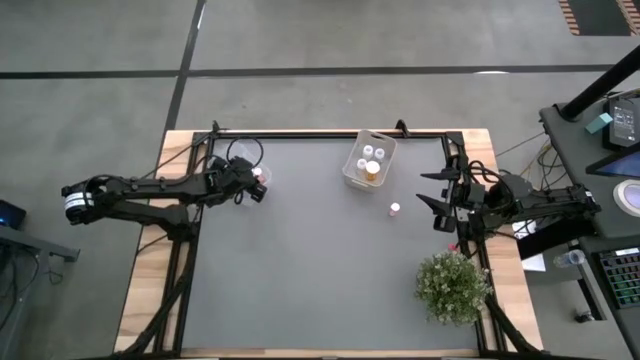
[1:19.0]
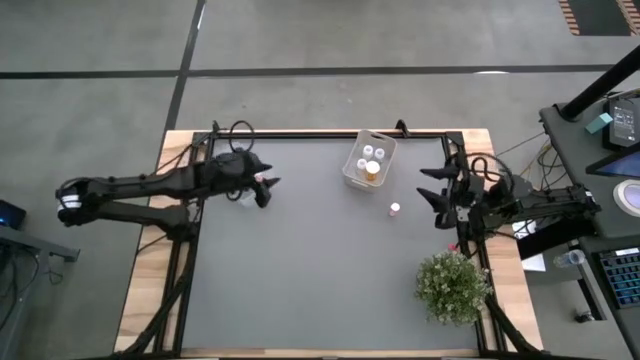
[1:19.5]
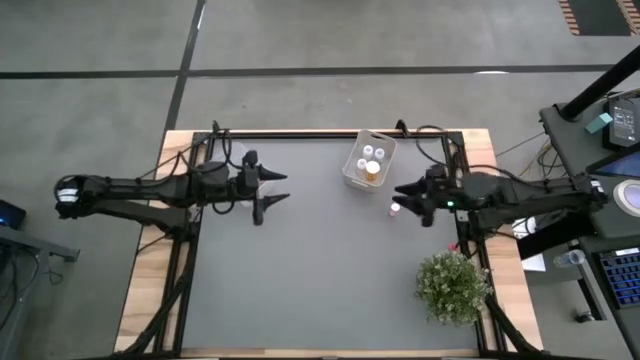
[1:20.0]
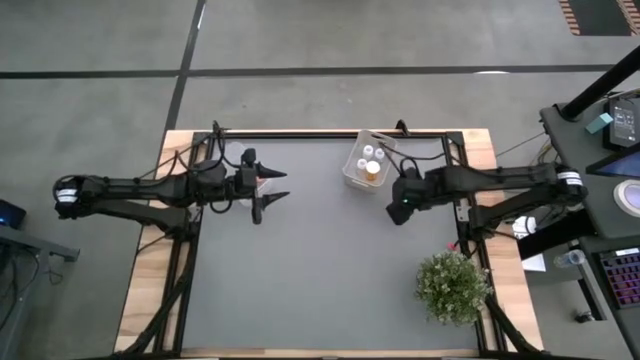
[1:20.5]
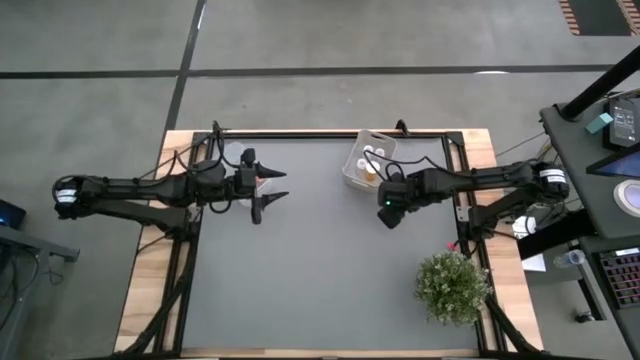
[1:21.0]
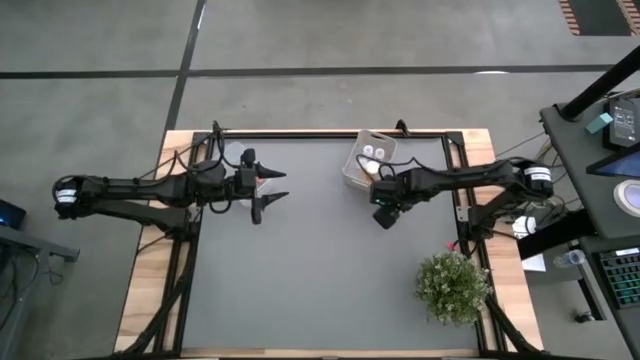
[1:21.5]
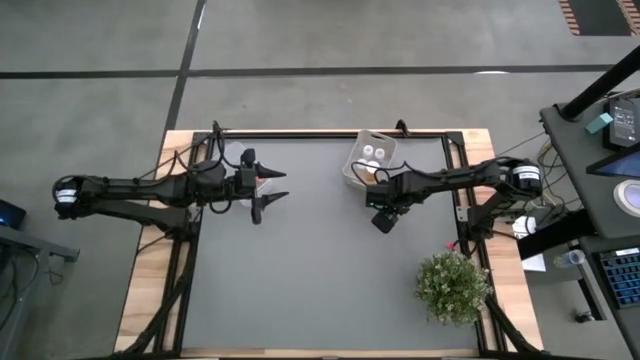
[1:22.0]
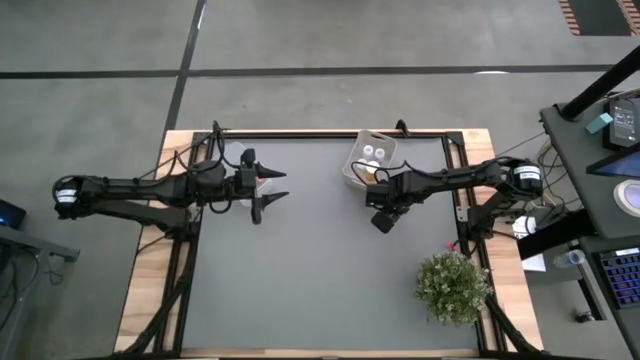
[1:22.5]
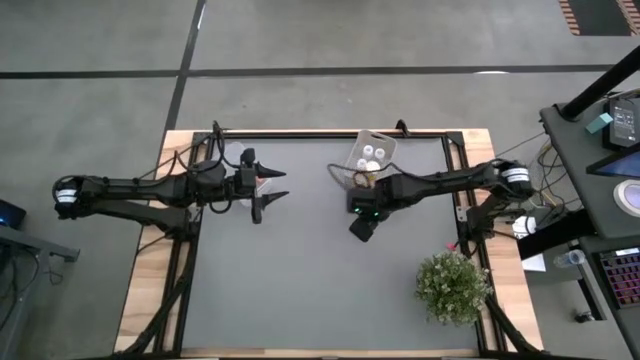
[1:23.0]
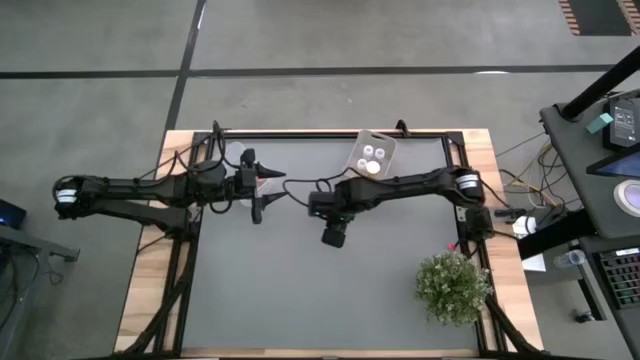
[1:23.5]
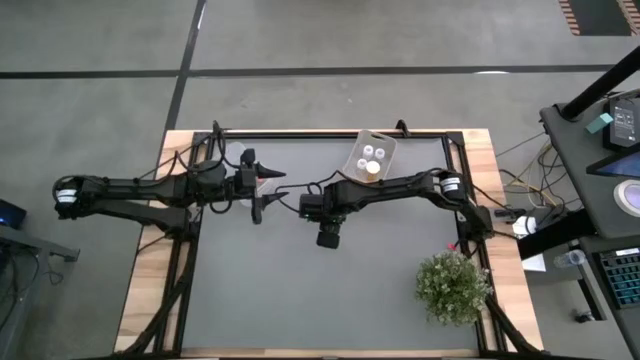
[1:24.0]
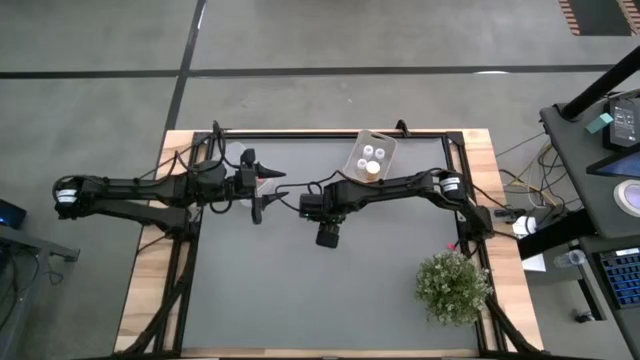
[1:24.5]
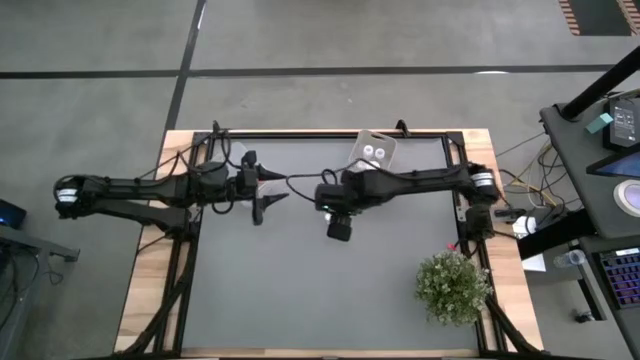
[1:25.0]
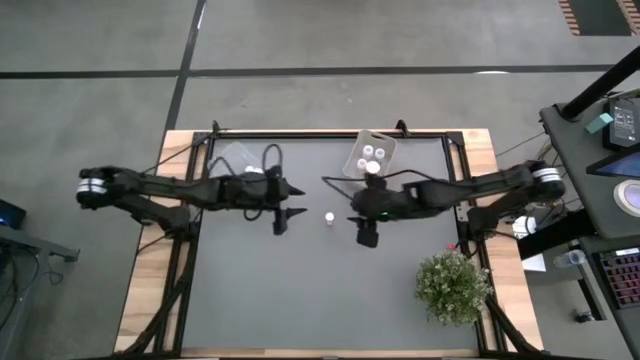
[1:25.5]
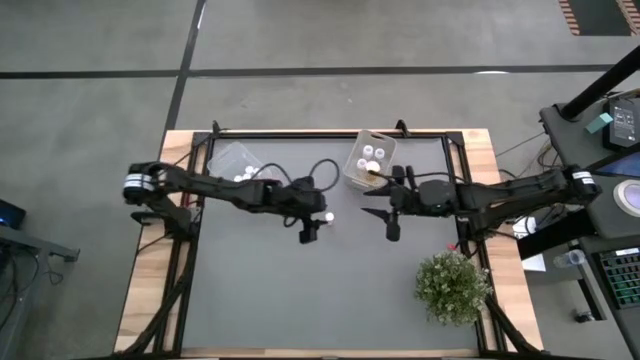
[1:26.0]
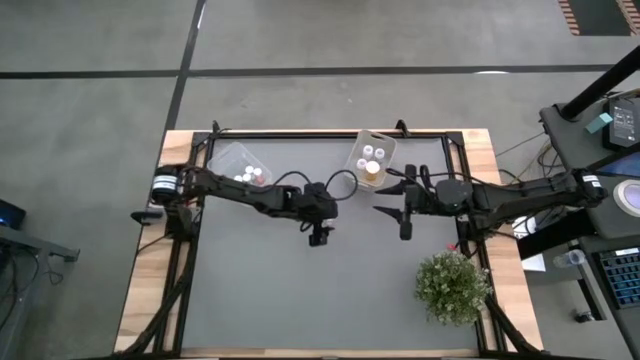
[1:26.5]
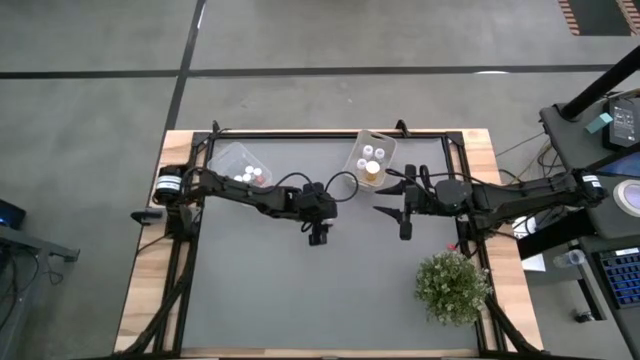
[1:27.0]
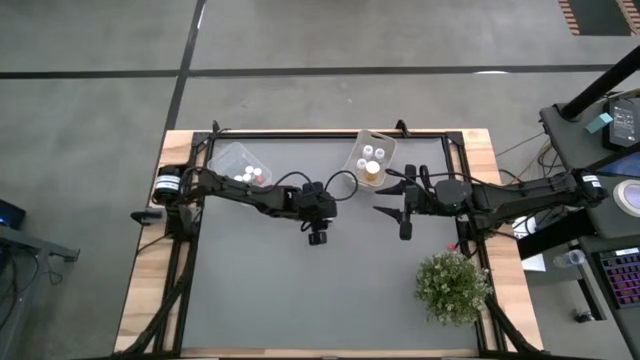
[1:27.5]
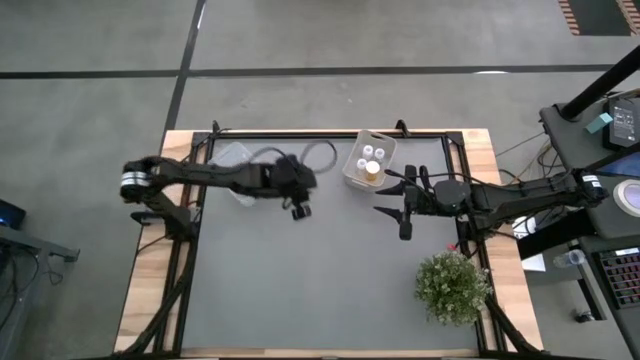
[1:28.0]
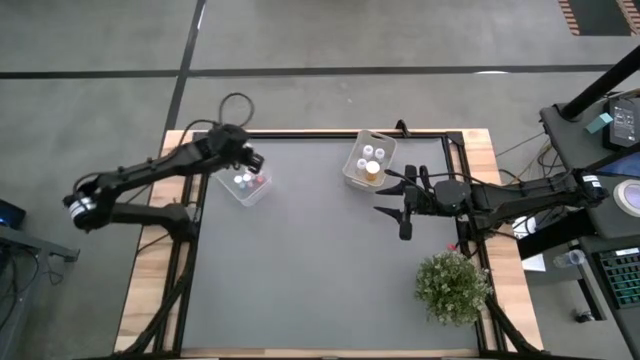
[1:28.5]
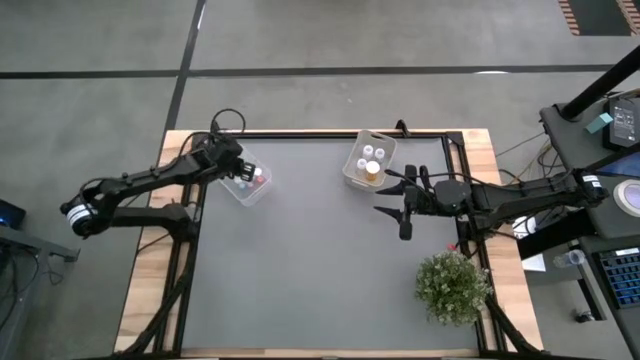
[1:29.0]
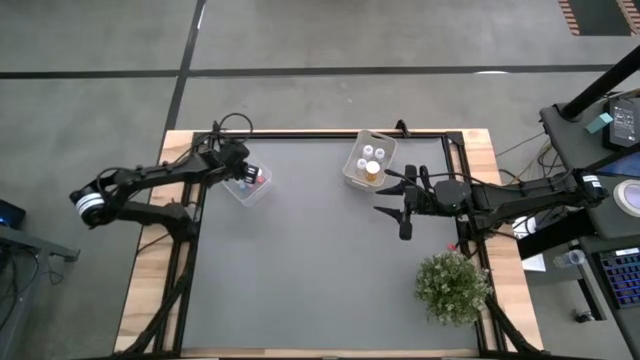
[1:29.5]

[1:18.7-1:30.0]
Task: Pick and place medicine bottles into bin by pill shape (circle, oval)
Put the violet pill bottle into the transparent bin

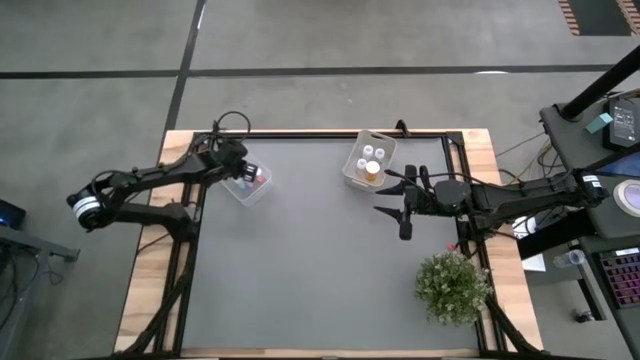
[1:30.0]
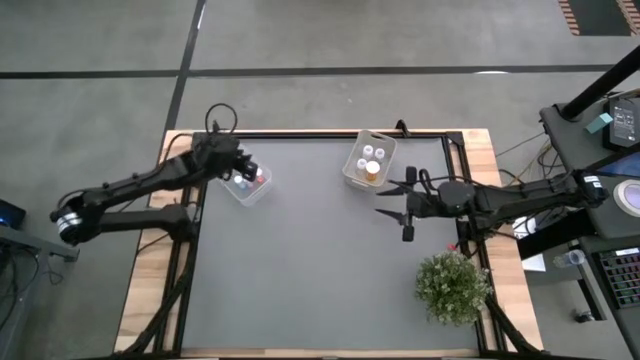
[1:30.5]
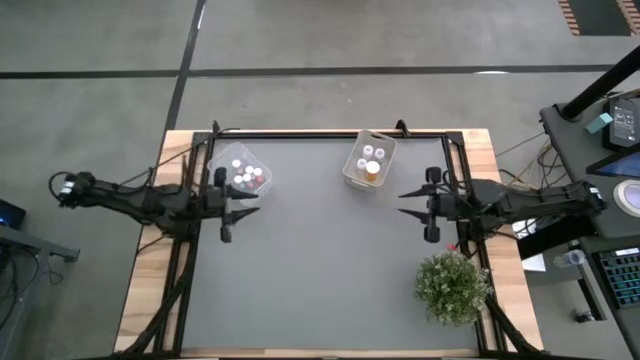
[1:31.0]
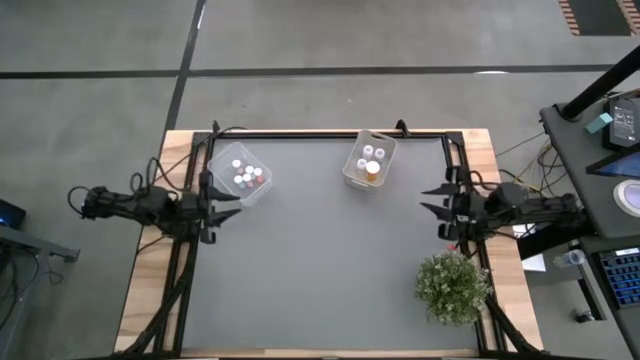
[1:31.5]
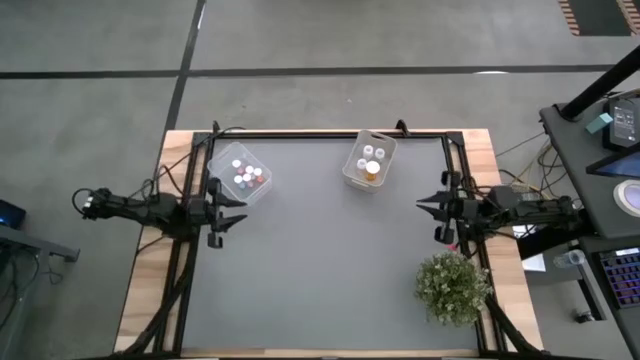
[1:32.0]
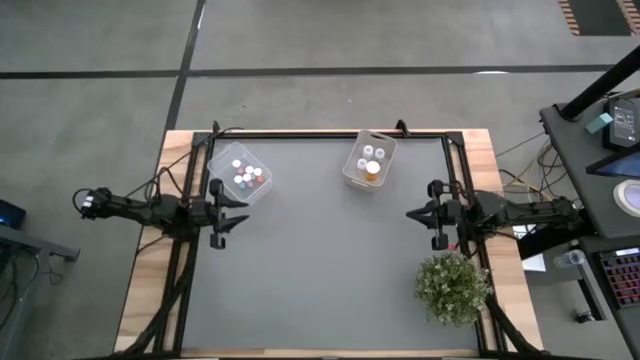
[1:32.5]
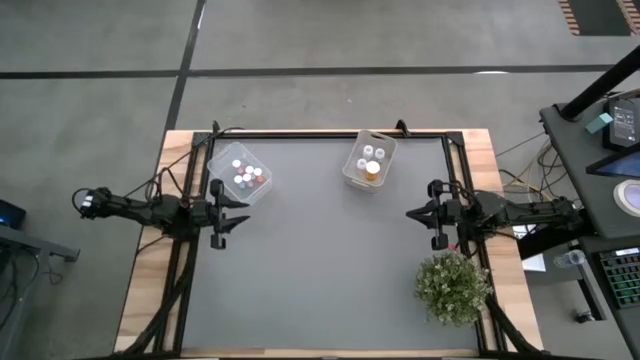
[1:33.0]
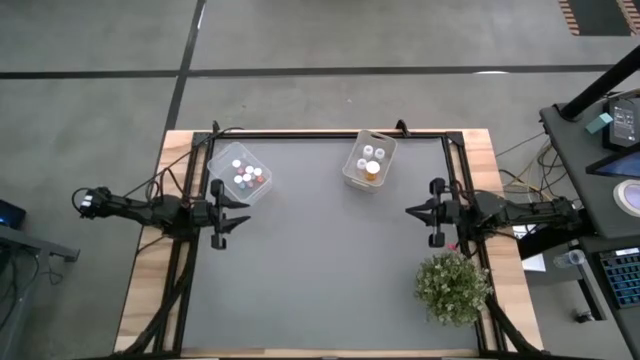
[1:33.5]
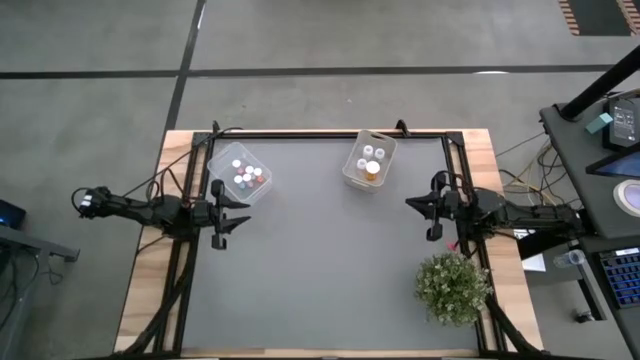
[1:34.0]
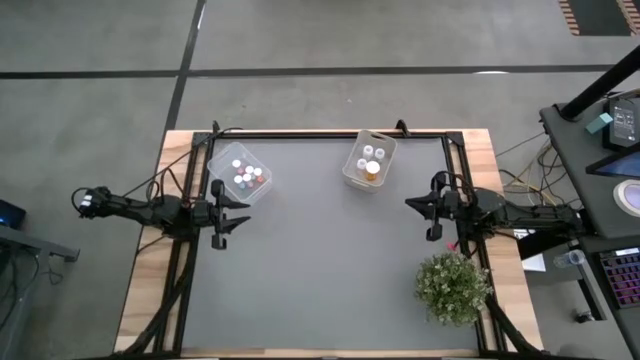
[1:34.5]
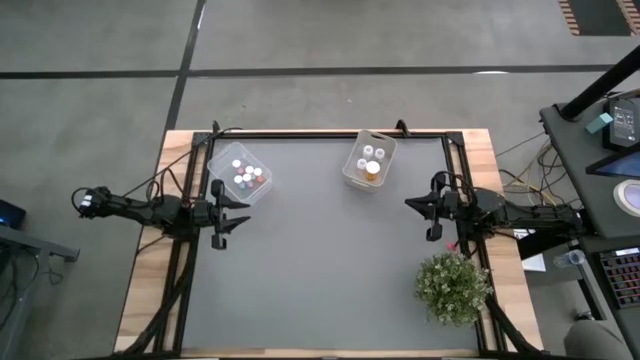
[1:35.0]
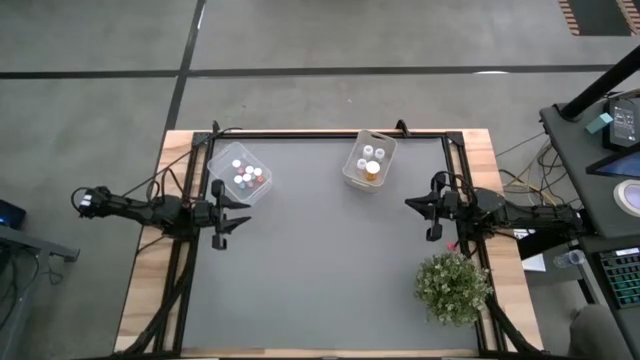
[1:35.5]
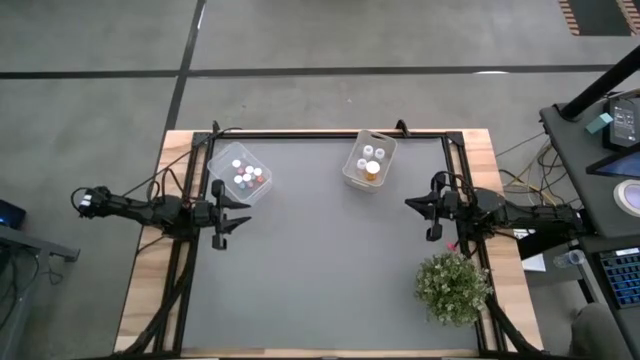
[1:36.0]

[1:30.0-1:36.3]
Return to Home Position

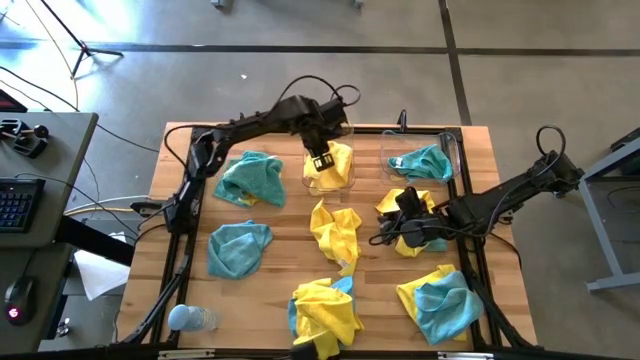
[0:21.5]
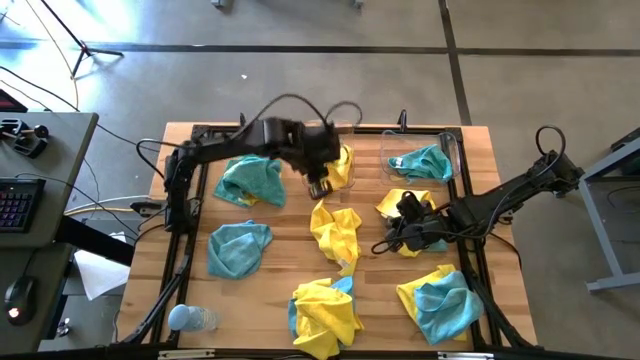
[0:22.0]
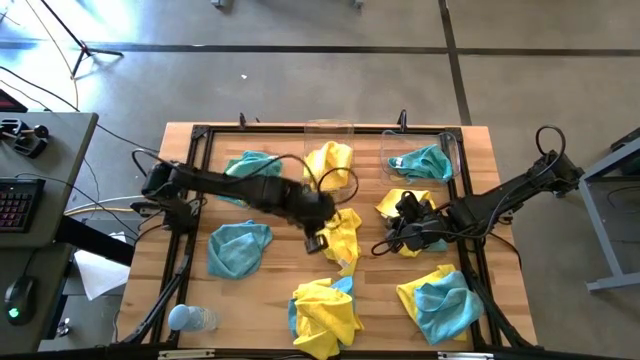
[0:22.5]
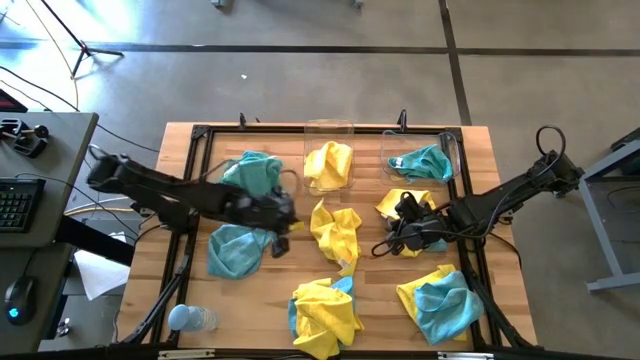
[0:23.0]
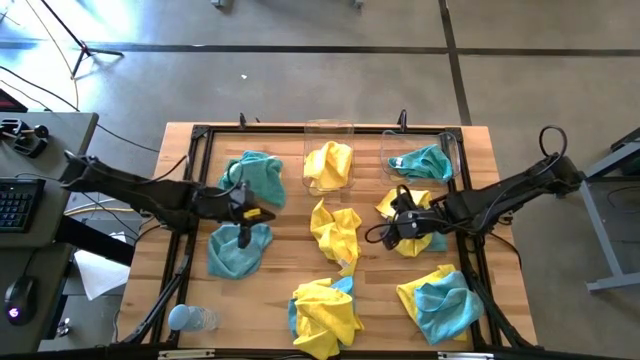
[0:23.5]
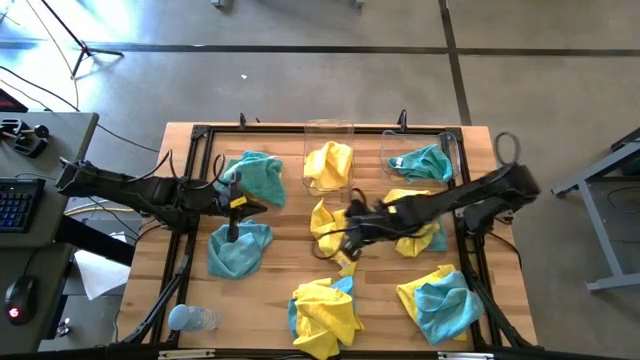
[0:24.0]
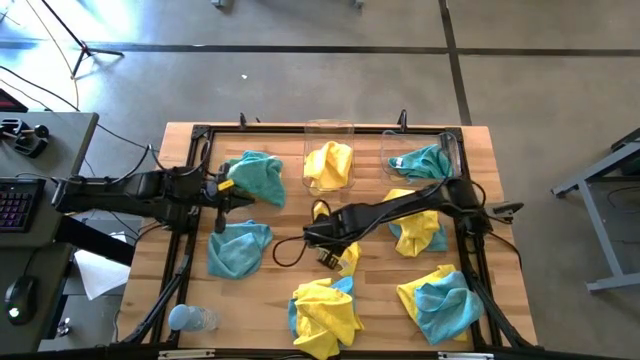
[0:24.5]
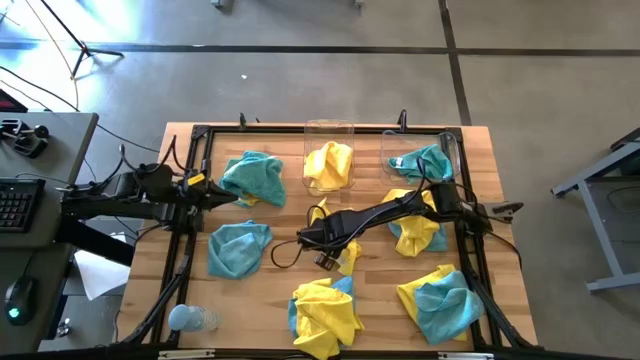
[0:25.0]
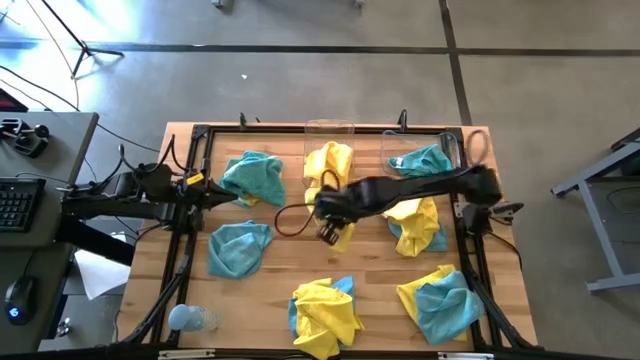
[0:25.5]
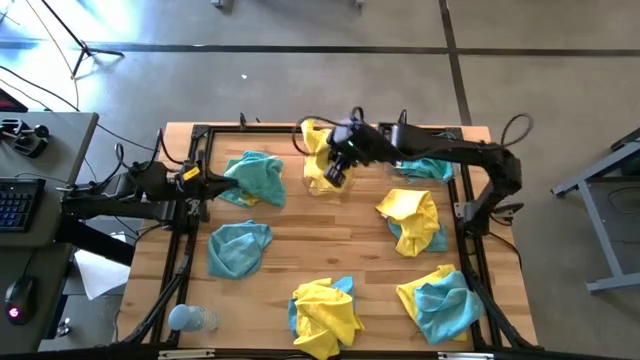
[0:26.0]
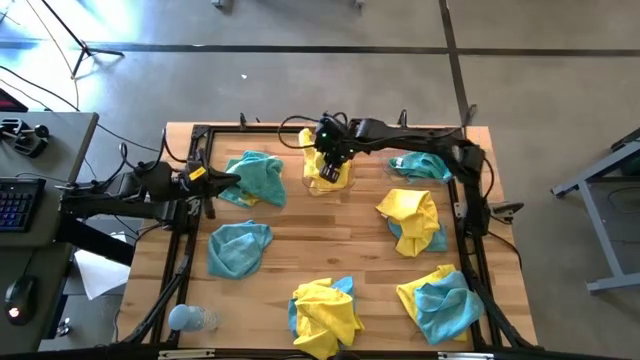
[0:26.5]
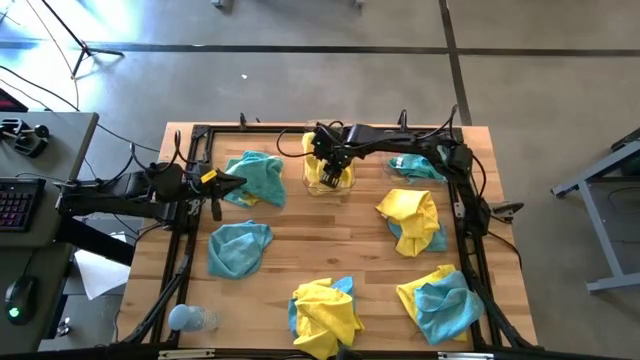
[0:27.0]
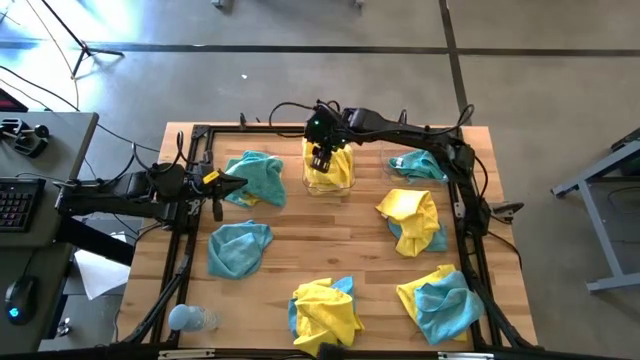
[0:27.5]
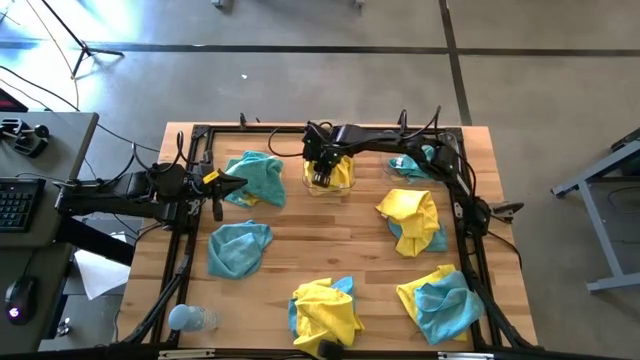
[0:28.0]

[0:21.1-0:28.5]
Task: Sort microfiber towel by color & place in baskets
Put the yellow towel into the left transparent bin
